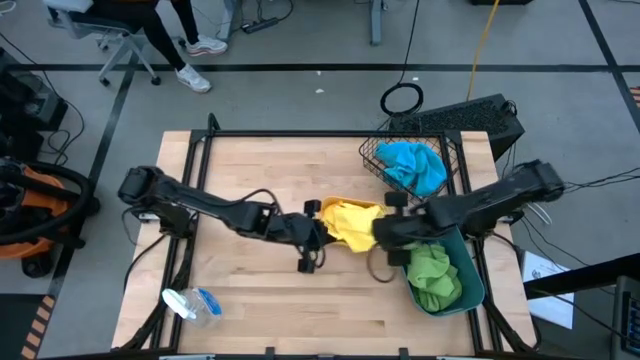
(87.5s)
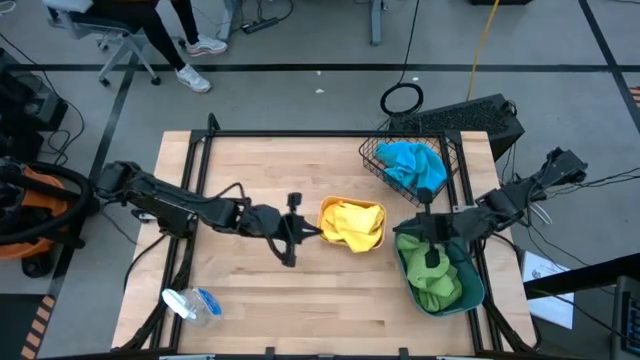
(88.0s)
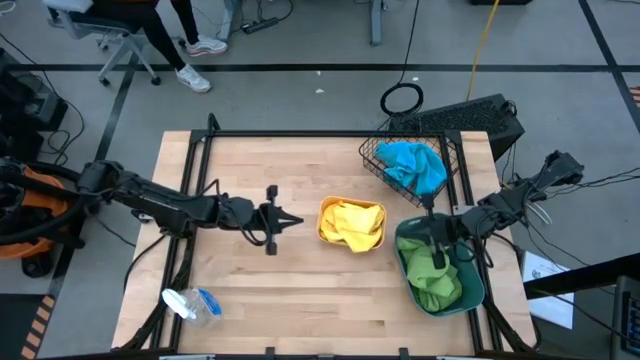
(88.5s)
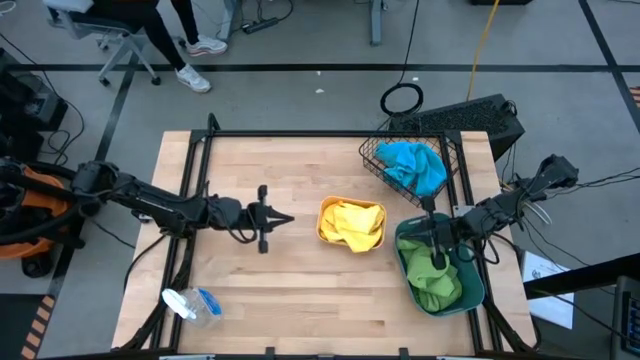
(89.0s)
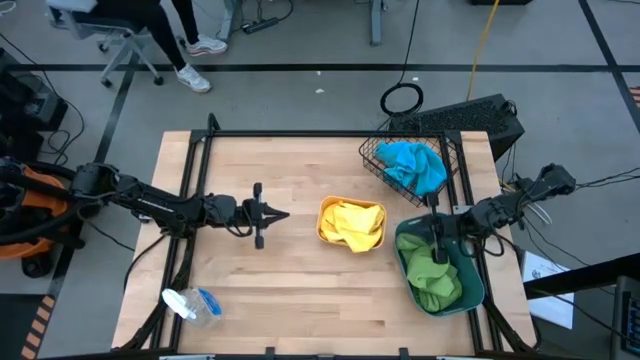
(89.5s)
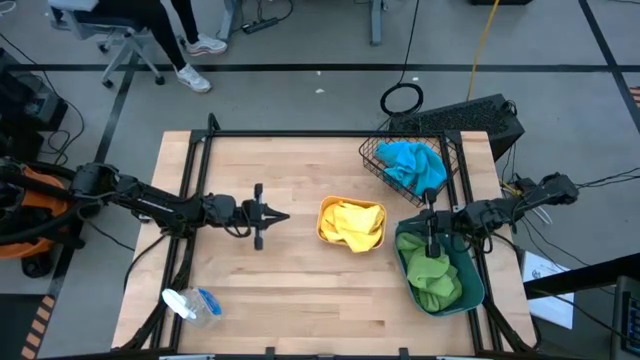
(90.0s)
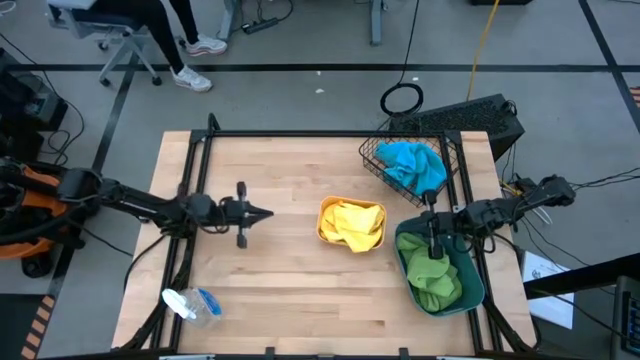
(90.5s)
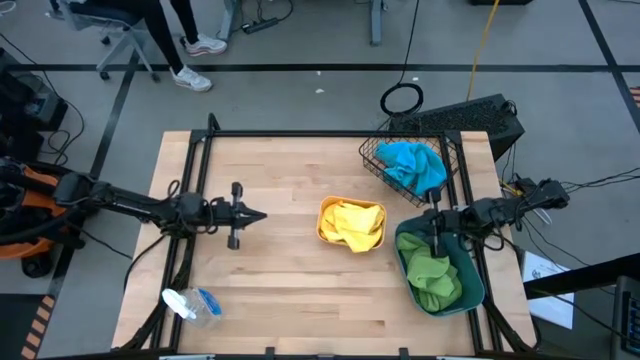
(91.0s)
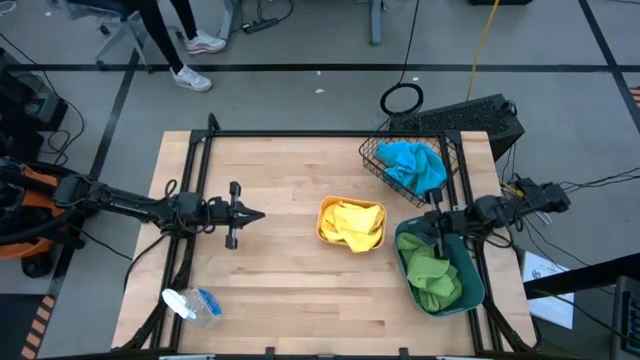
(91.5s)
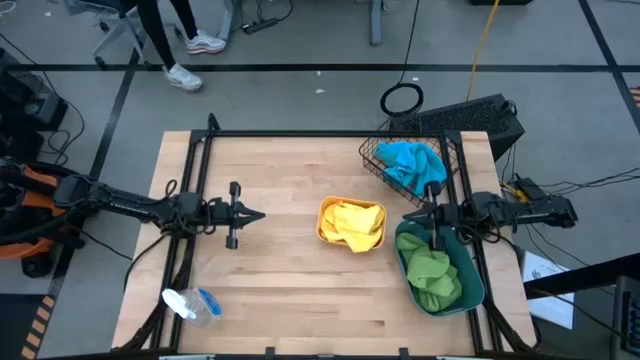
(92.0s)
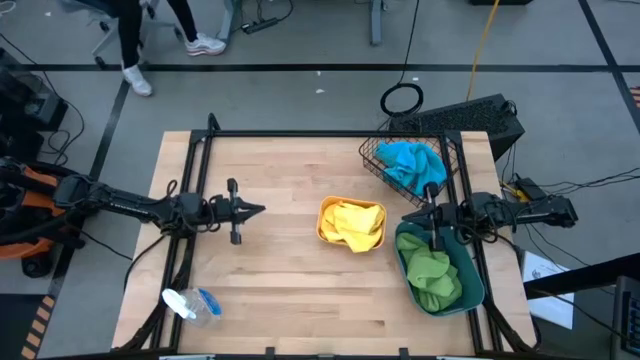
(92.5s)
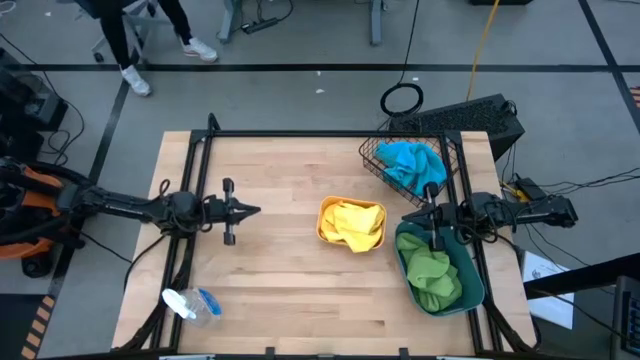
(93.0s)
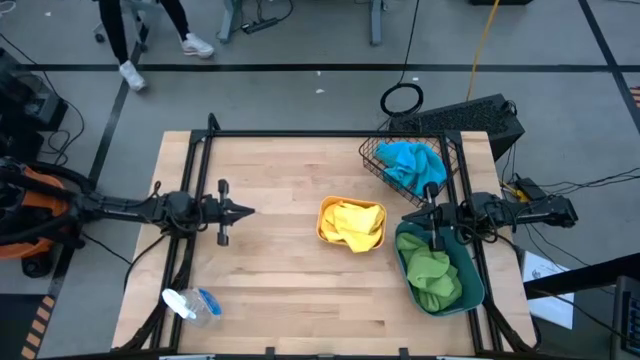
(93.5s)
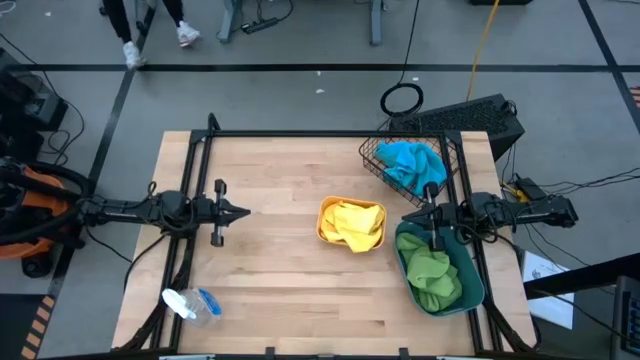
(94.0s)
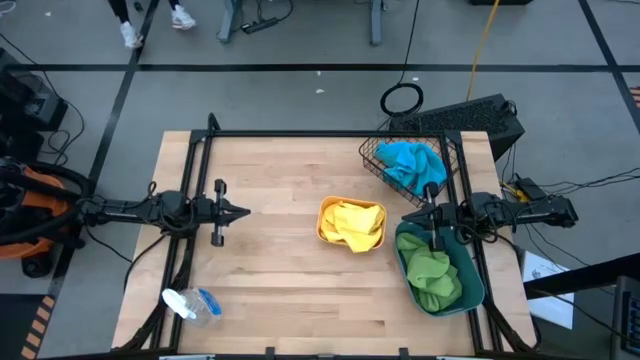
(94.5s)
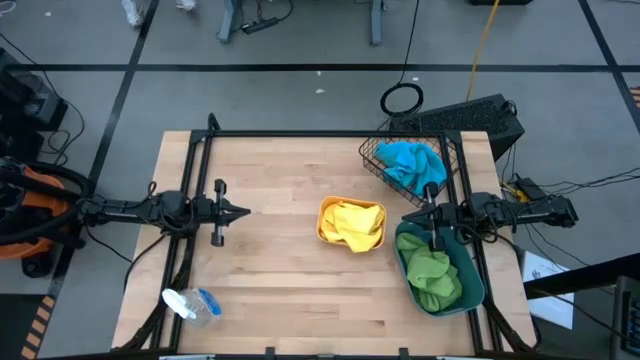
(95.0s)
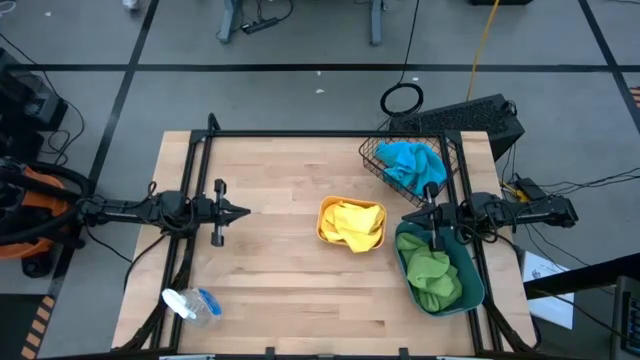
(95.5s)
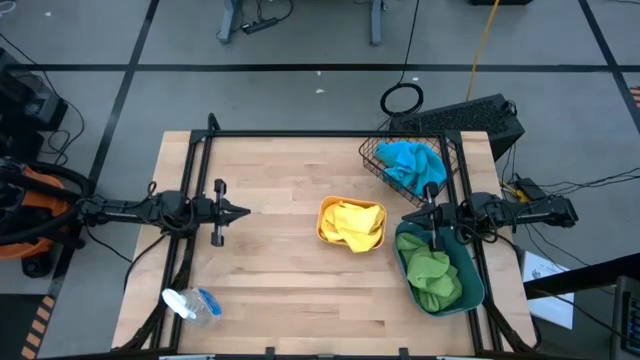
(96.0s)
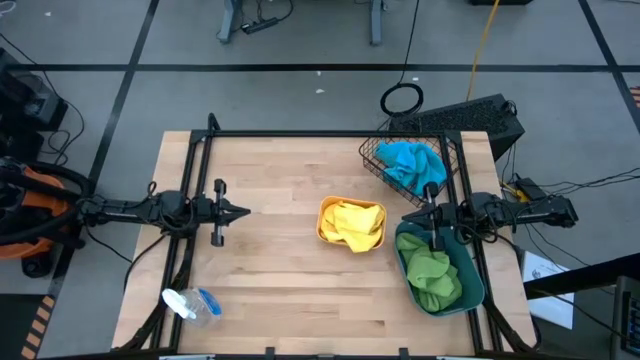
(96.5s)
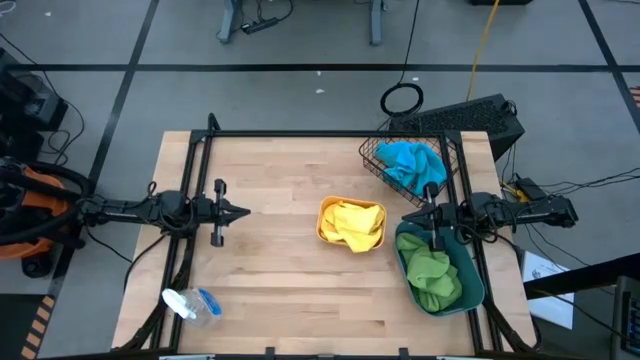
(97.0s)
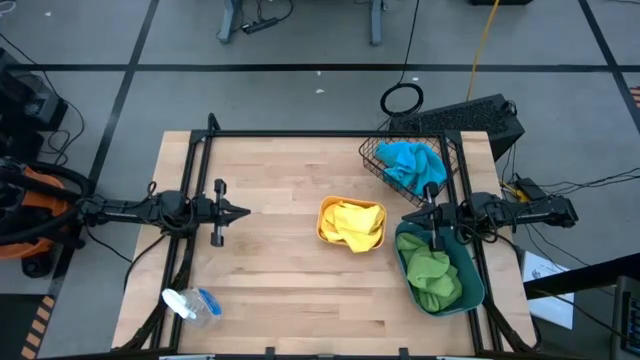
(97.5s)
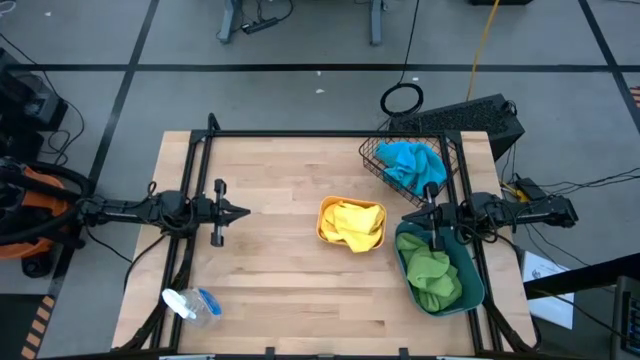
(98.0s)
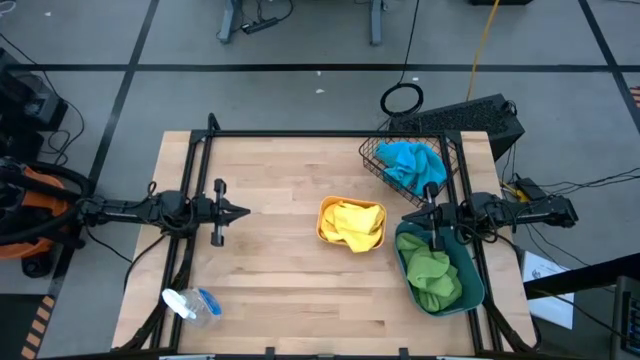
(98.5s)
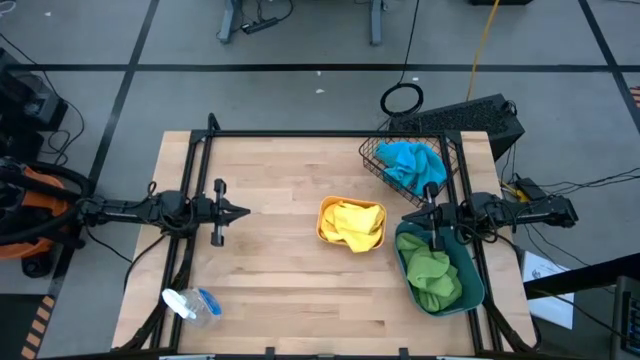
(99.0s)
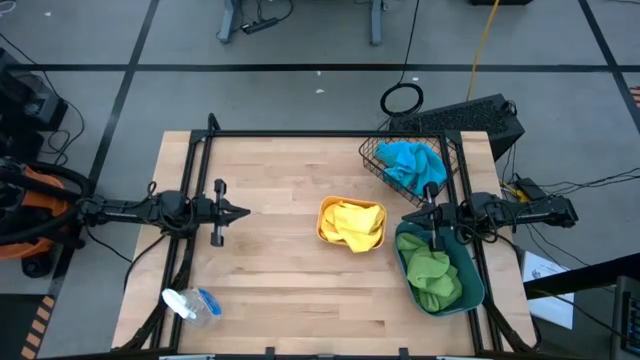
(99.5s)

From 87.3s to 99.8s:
Task: Sort microfiber towel by color & place in baskets
Return to Home Position

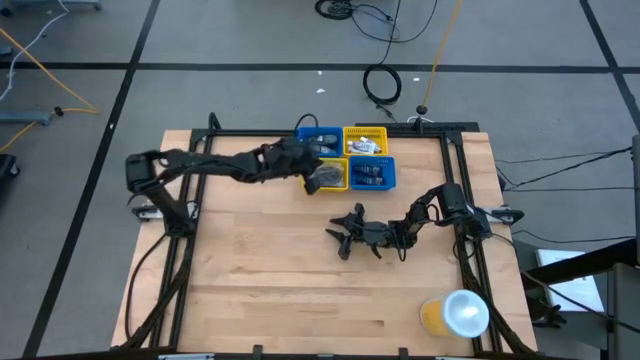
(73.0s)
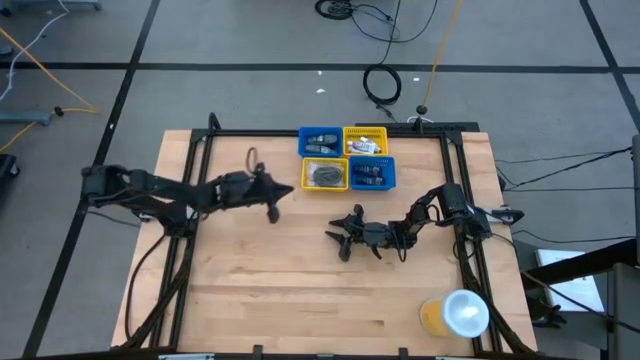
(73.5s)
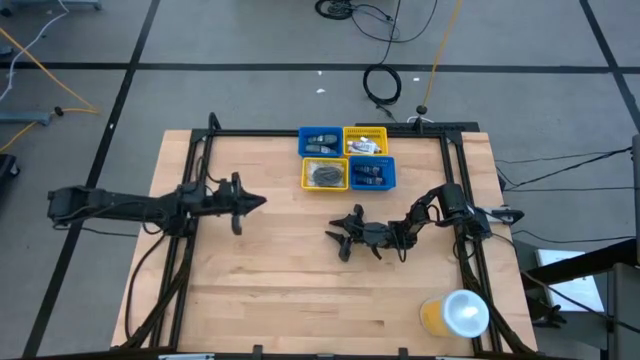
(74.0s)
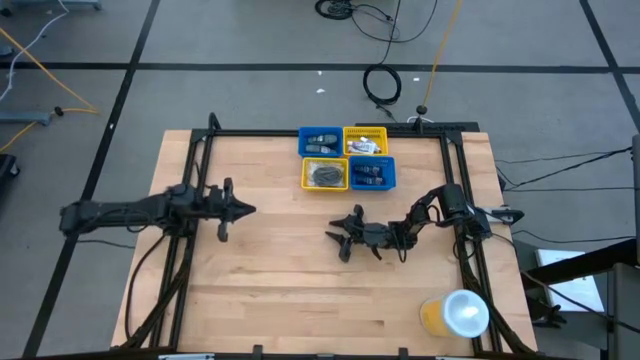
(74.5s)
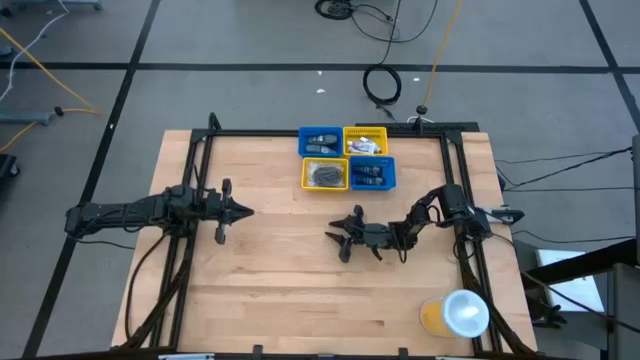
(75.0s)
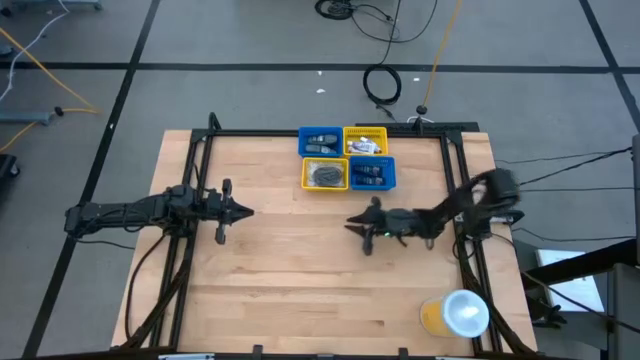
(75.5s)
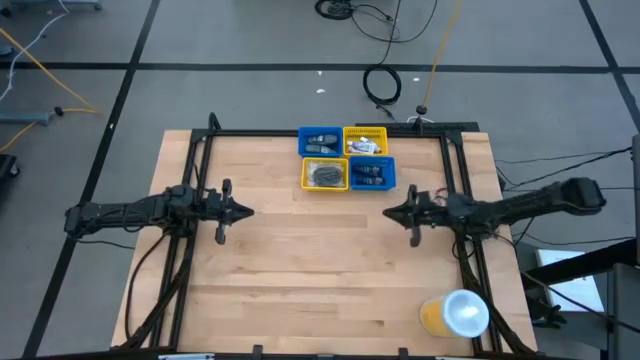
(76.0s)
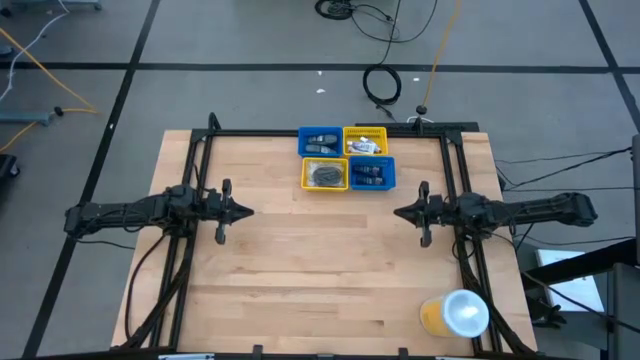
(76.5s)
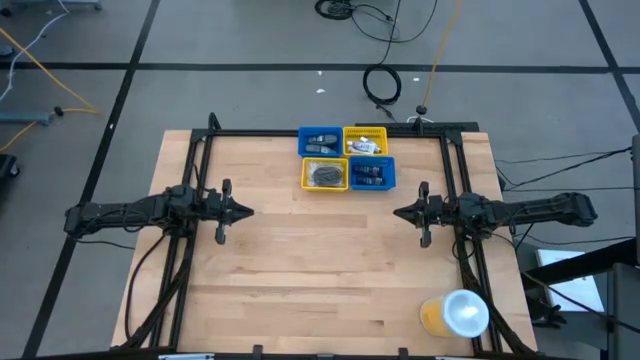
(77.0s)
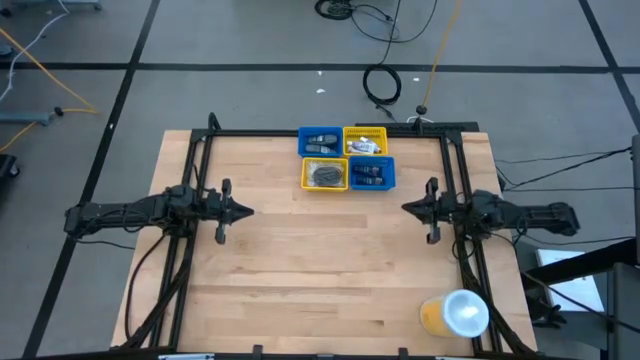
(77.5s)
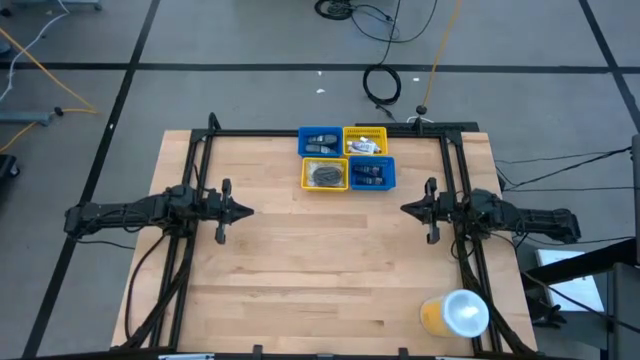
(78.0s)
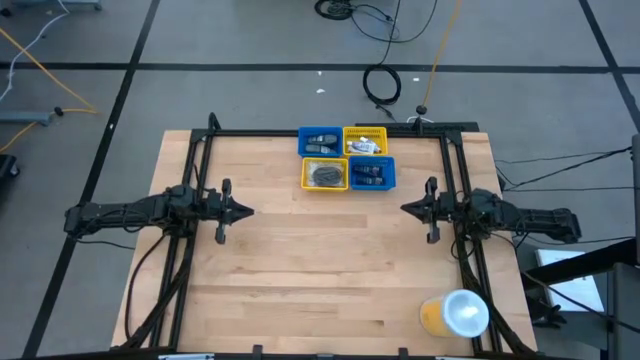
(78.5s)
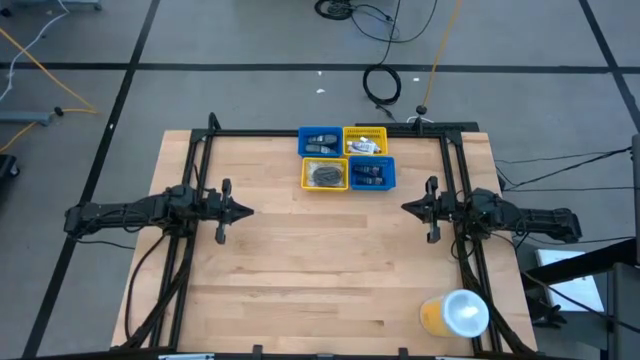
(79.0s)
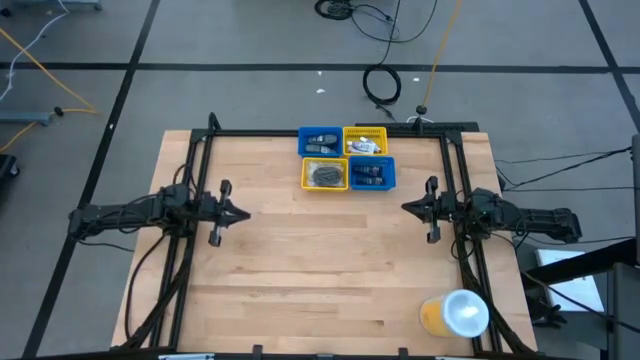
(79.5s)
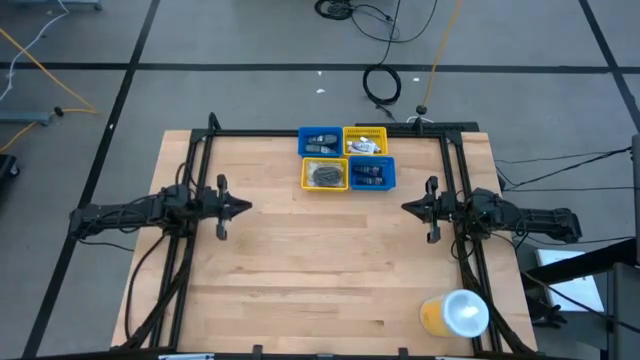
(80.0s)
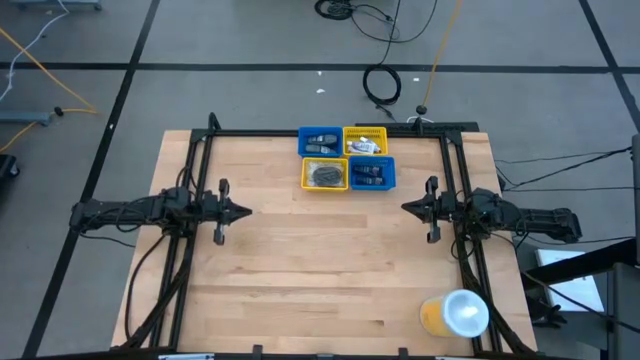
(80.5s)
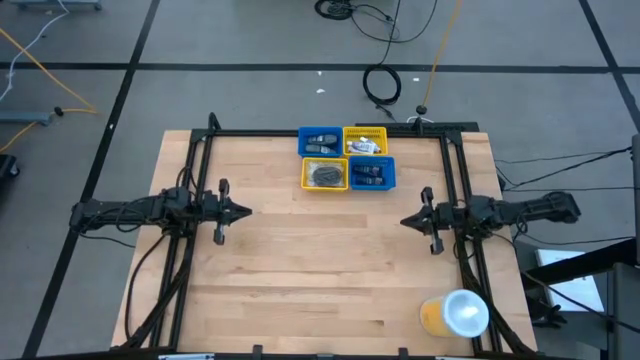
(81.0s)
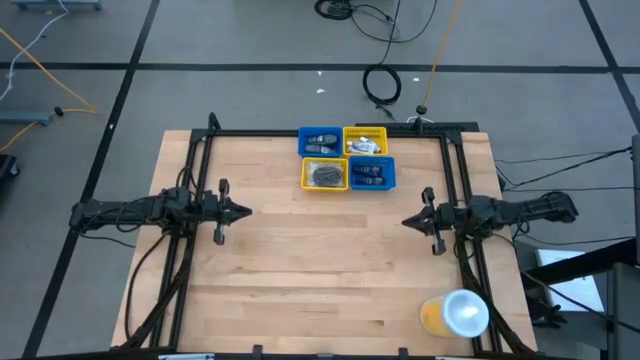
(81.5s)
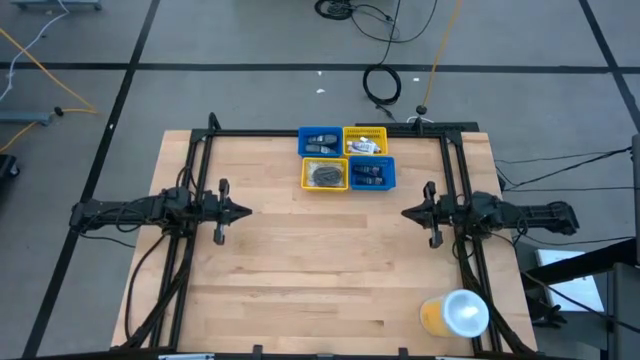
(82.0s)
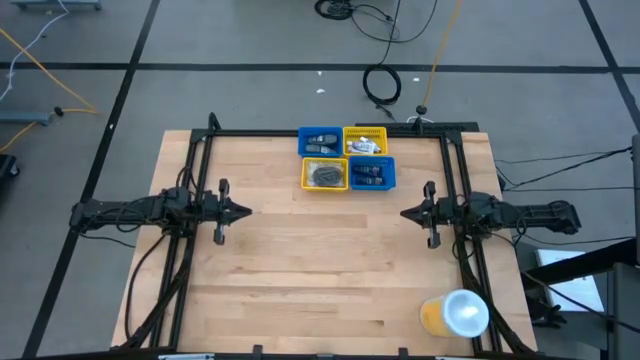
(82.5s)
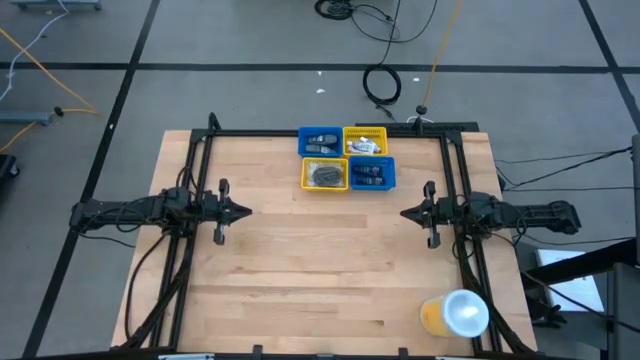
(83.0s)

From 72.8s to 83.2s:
Task: Pick & Place Travel size toiletries
Return to Home Position
